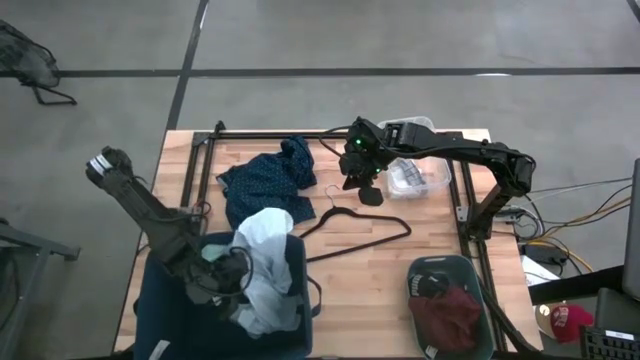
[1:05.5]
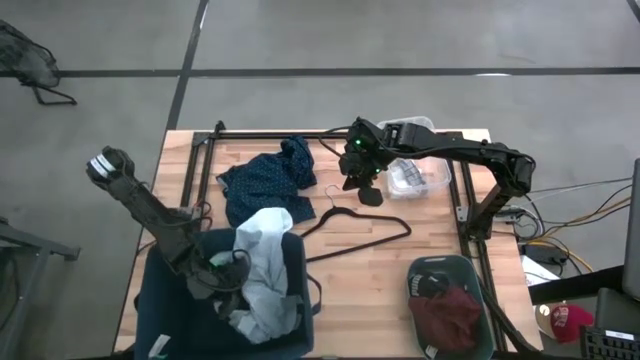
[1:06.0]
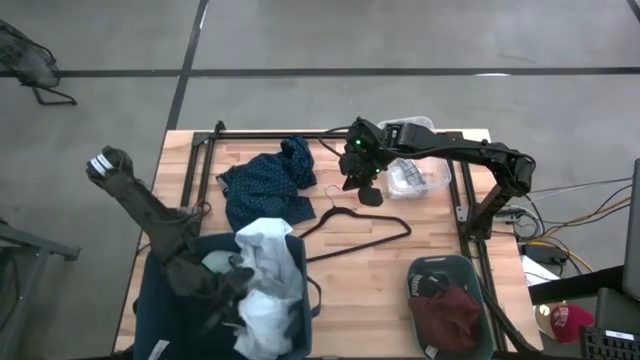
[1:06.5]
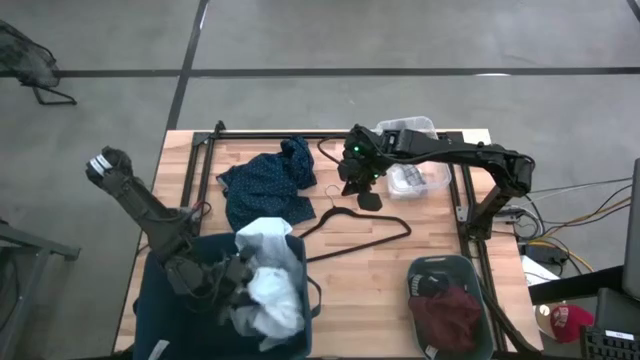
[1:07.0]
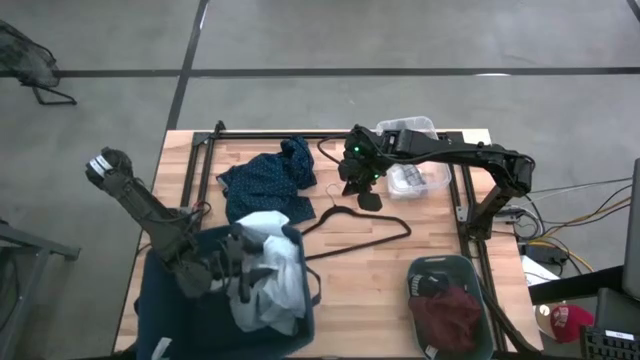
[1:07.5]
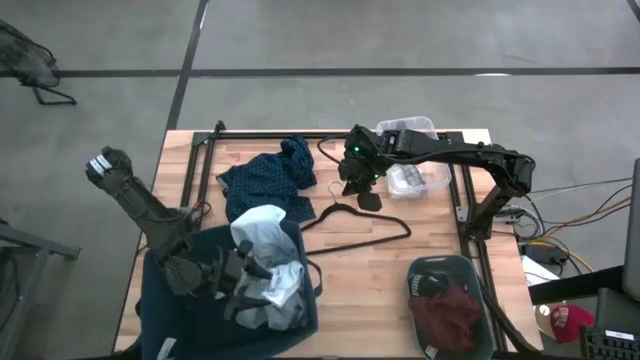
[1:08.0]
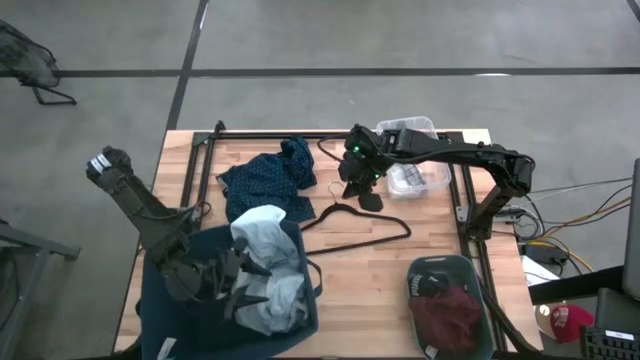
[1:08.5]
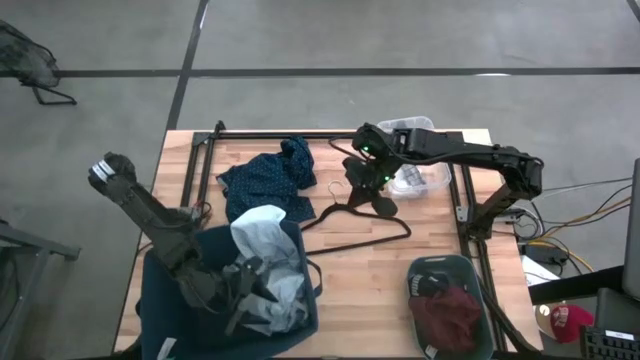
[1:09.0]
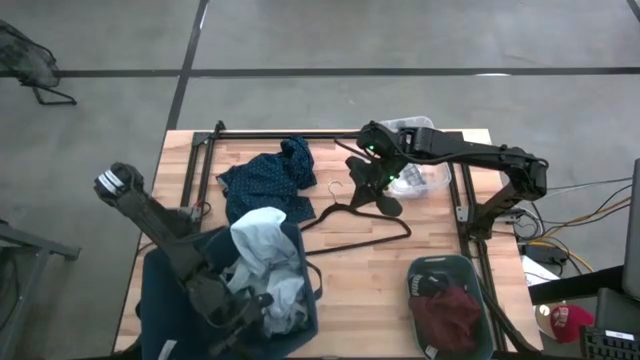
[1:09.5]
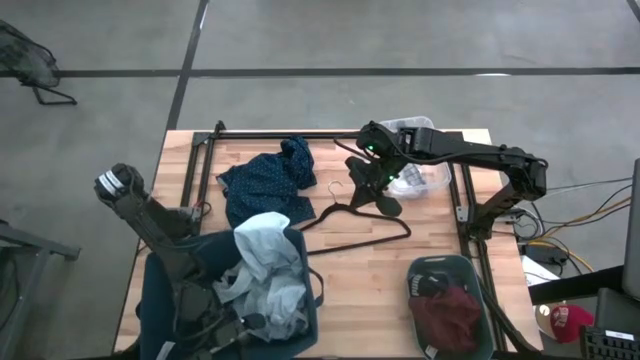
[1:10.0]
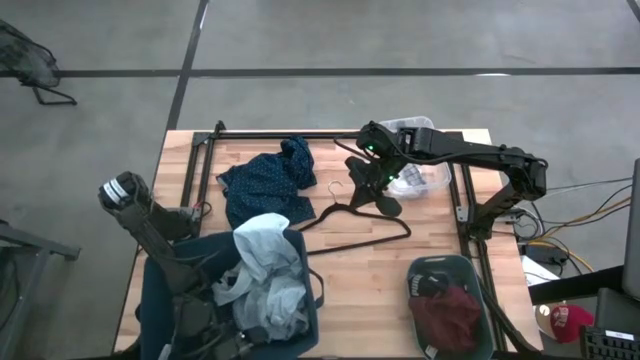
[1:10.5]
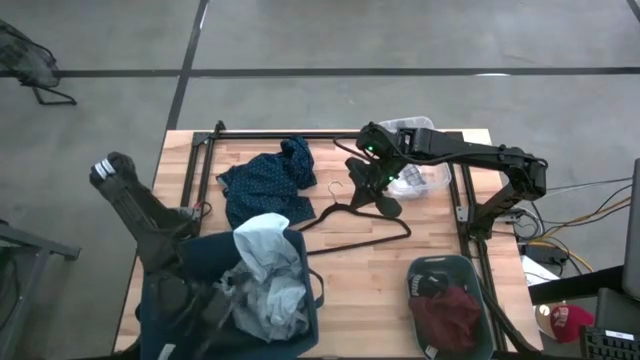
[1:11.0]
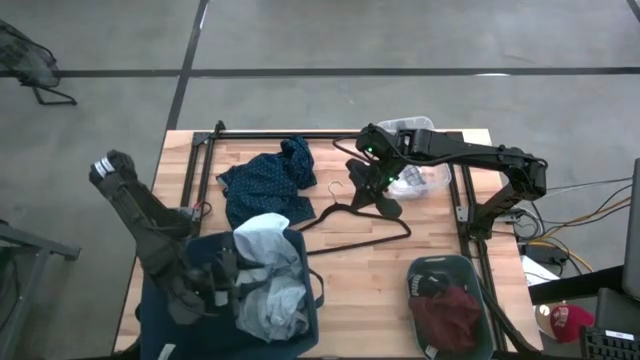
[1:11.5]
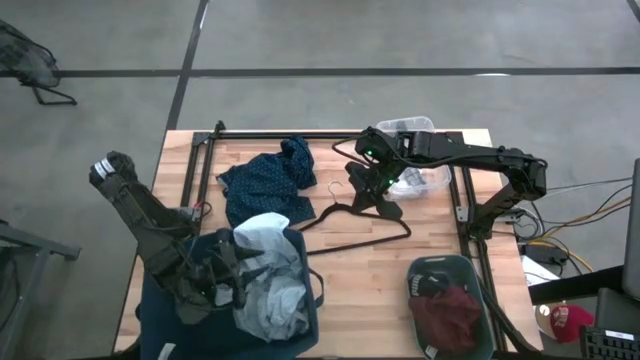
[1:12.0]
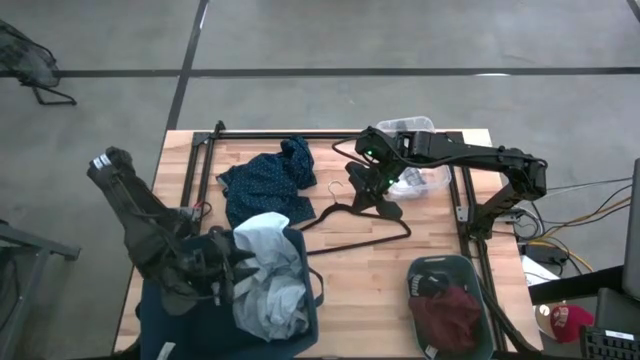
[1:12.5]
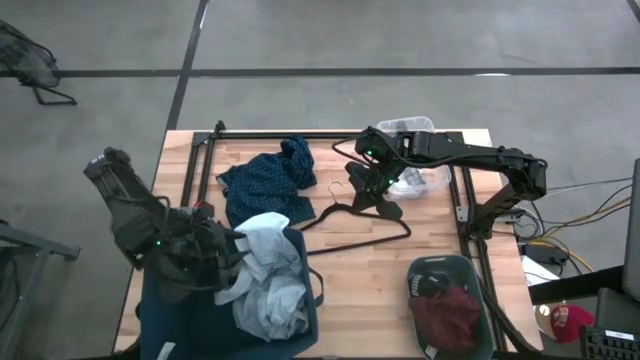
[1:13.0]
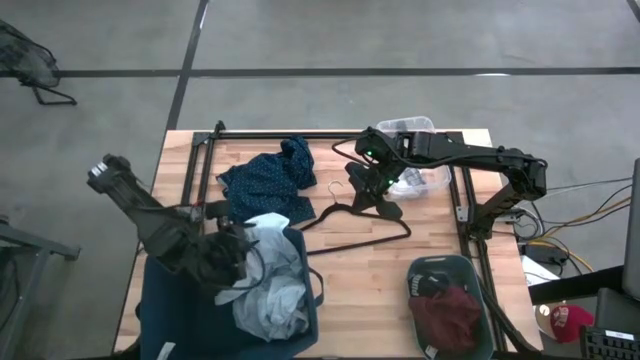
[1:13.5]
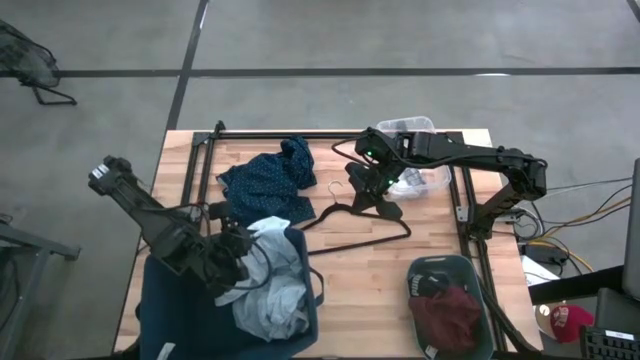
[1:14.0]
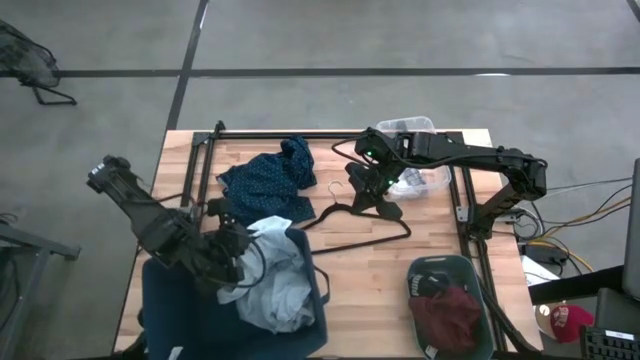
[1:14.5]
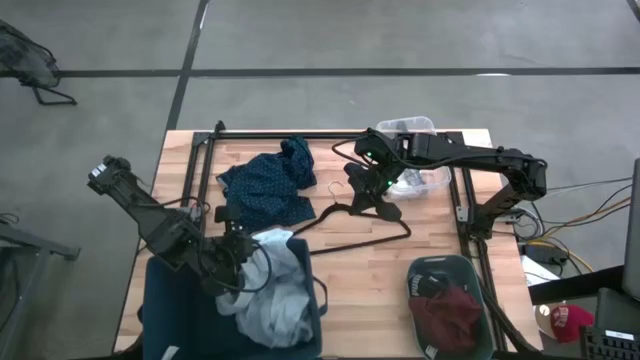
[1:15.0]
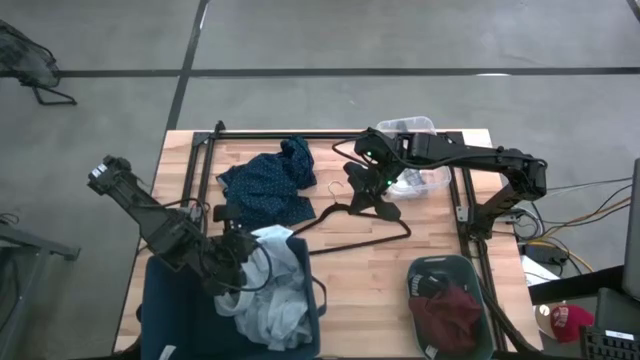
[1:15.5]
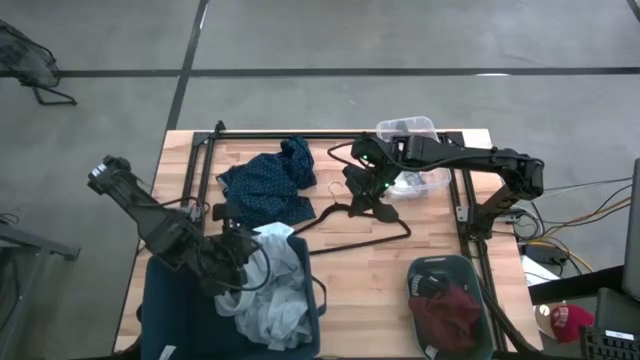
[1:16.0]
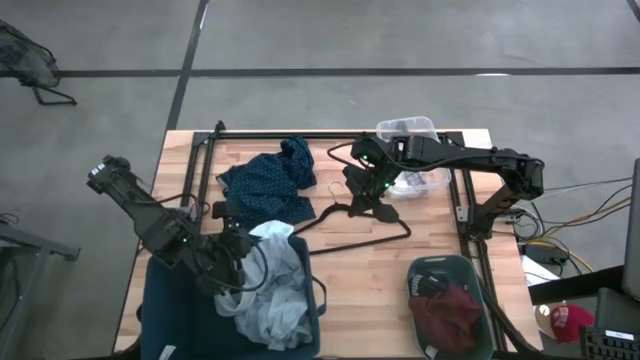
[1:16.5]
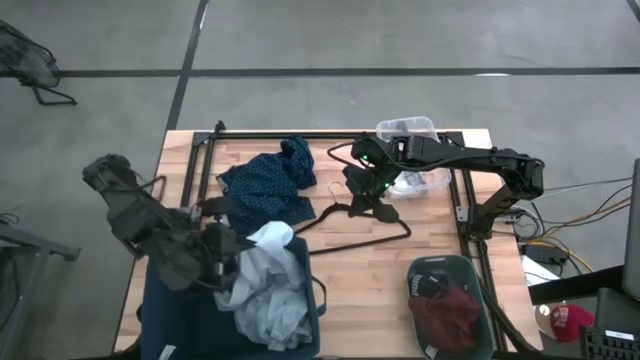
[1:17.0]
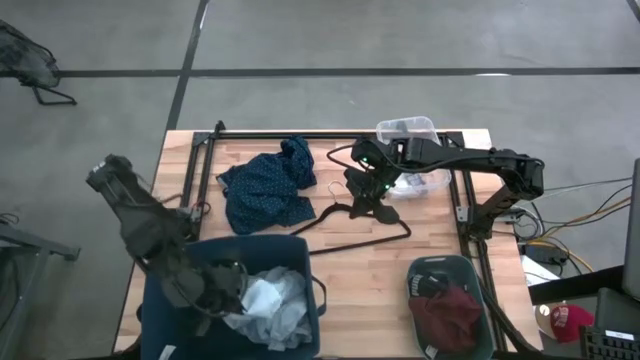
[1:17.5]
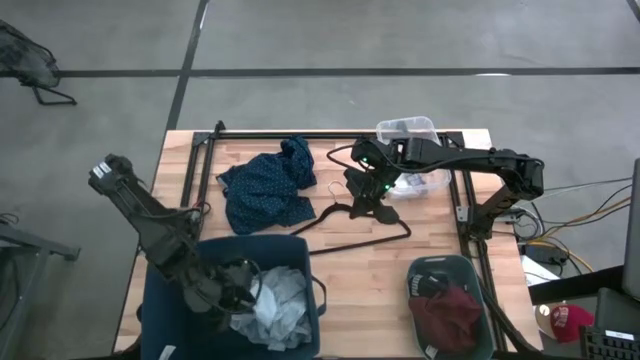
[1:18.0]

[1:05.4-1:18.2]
Task: Pick & Place Cloths
Put the white shirt into the blue laundry bin

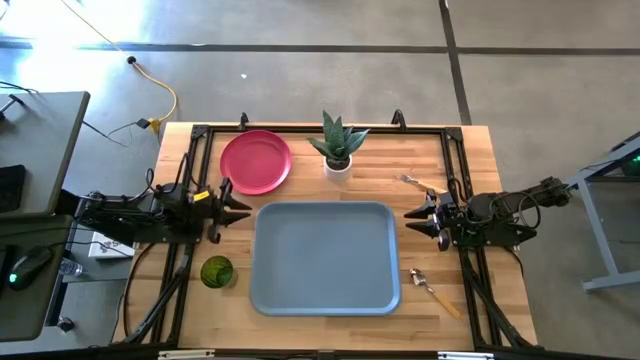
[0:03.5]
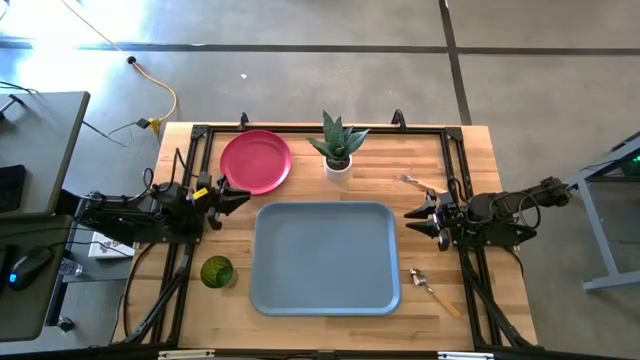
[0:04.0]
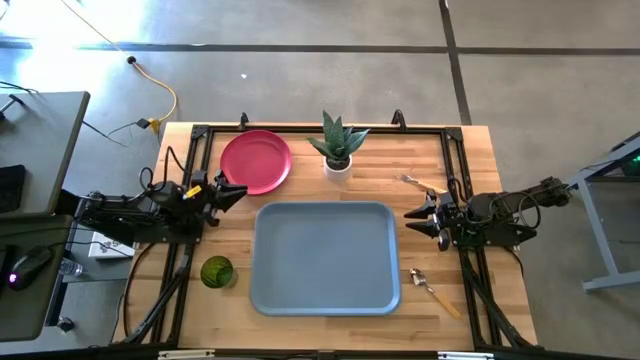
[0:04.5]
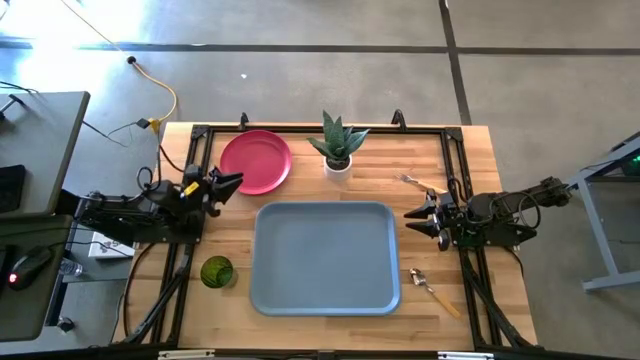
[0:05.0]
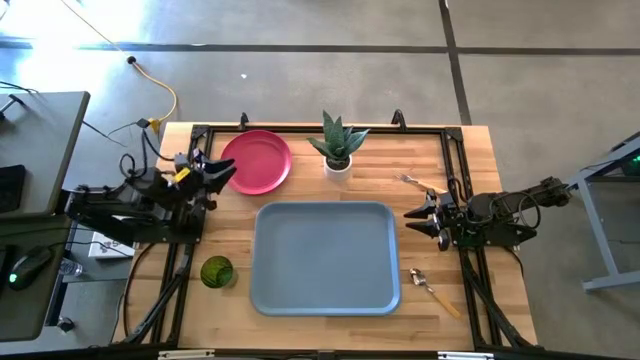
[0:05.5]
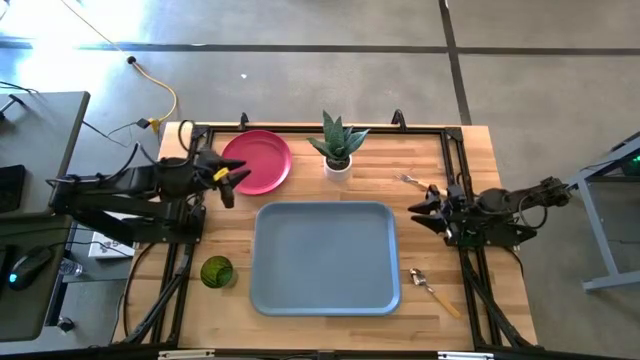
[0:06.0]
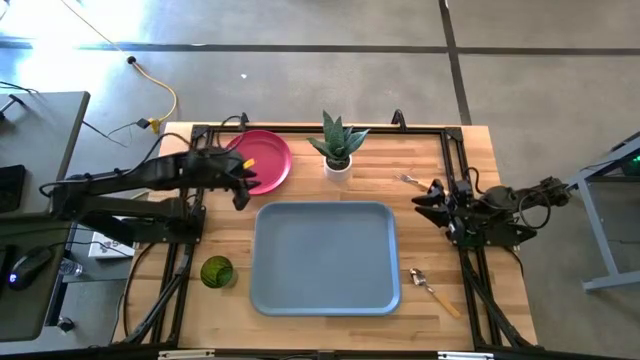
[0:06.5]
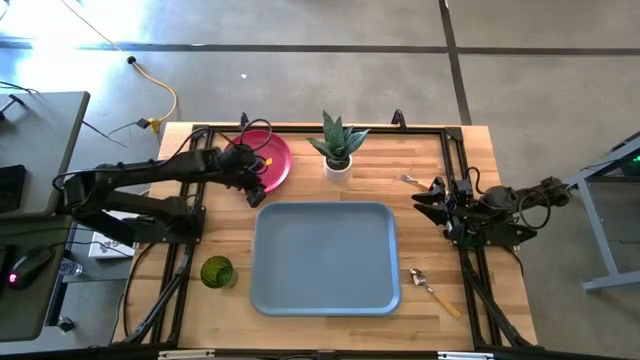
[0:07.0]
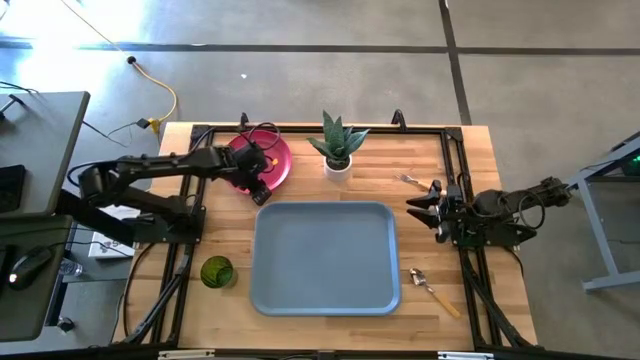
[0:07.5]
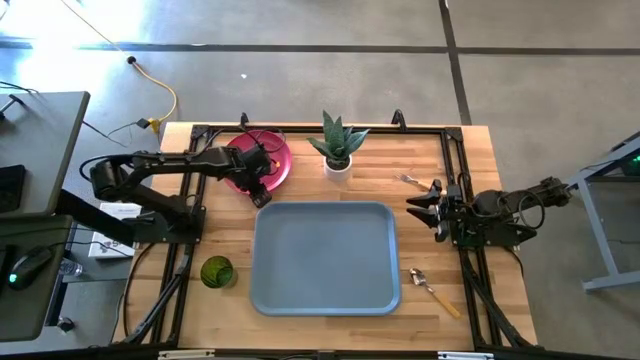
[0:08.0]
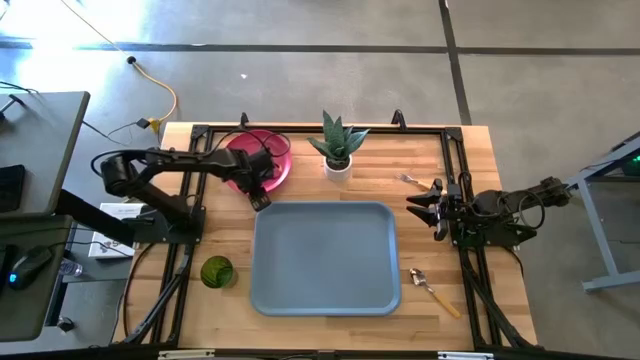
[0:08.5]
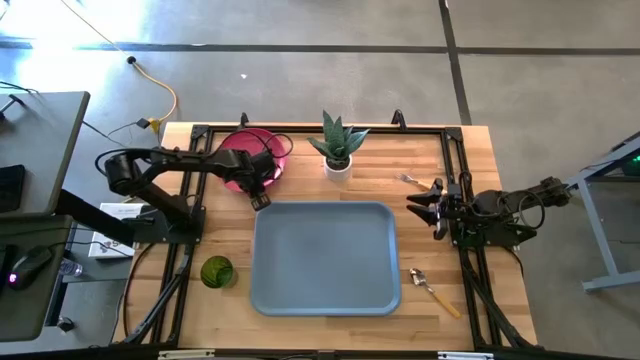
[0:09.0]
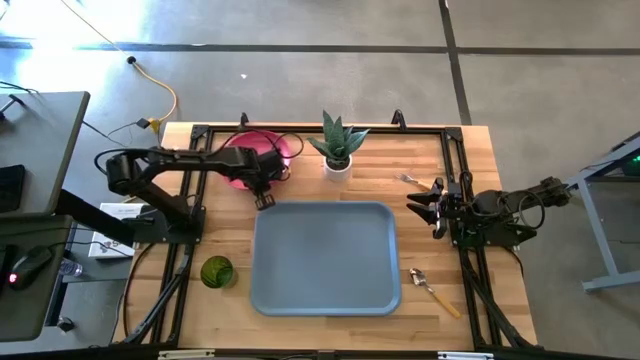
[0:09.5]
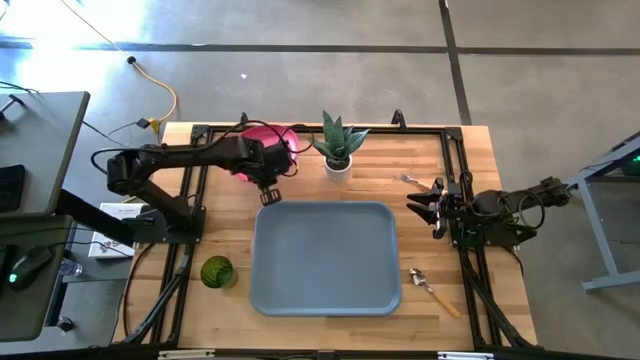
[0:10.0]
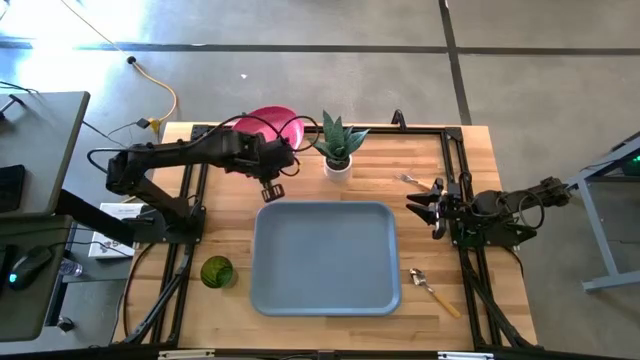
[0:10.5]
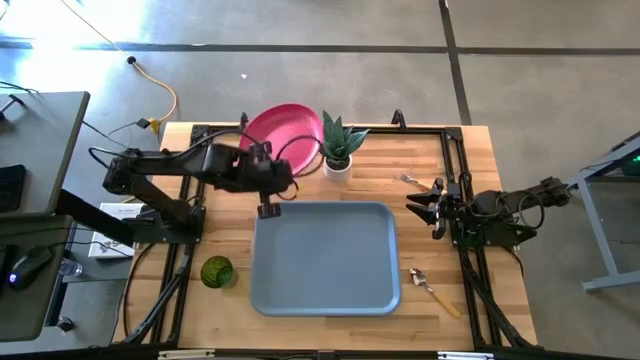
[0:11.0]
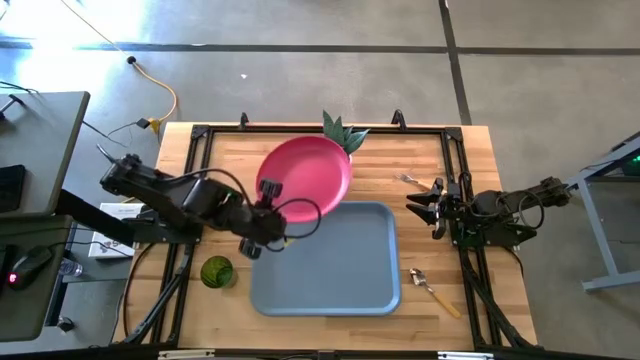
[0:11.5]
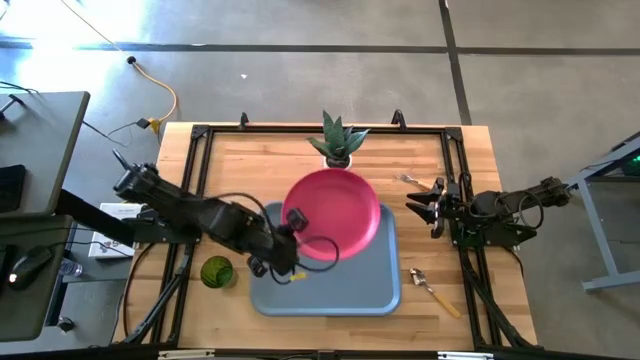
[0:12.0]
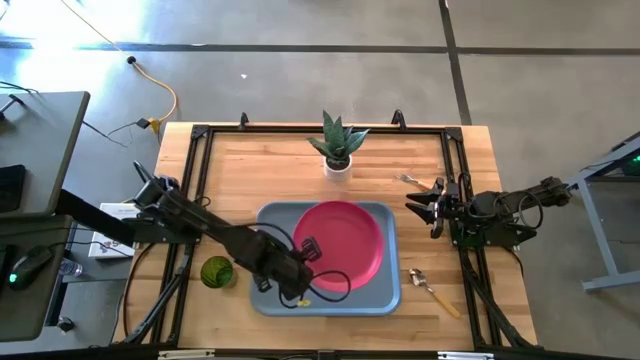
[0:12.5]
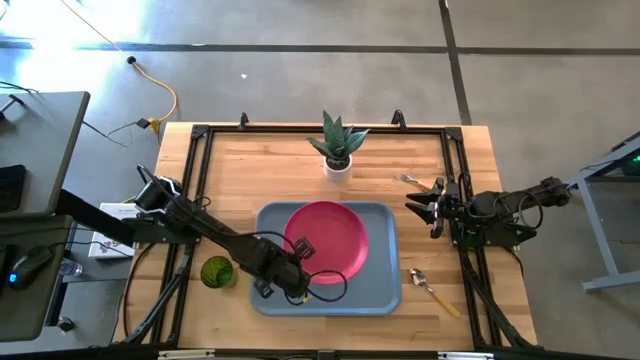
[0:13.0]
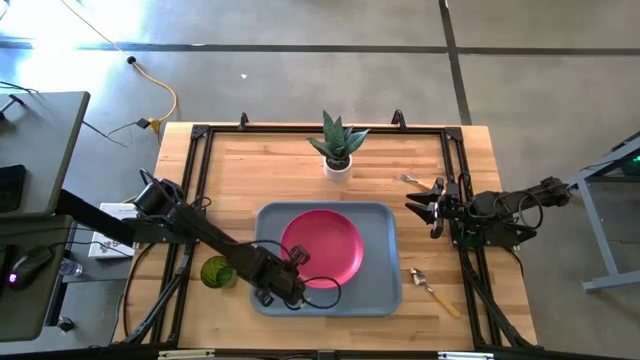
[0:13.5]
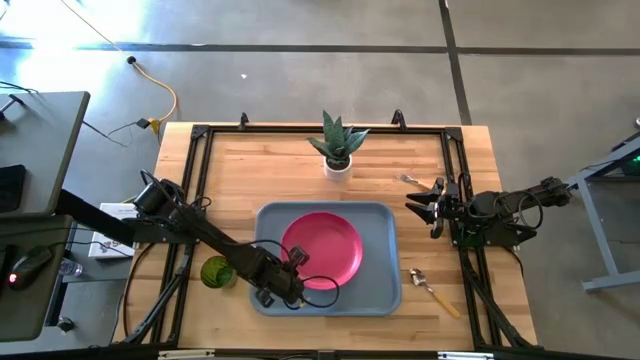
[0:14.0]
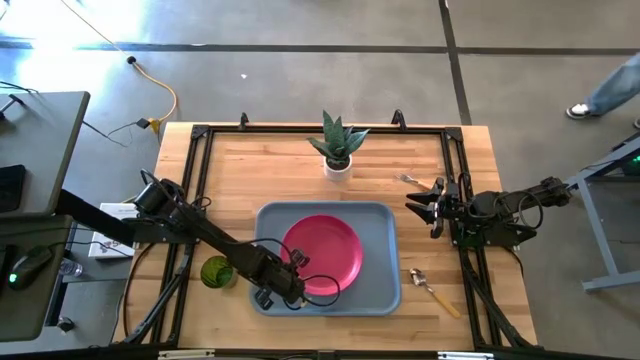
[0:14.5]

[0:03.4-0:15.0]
Task: Pick and place plate/cup/fork/spoon on tray
Put the pink plate on the light blue tray
